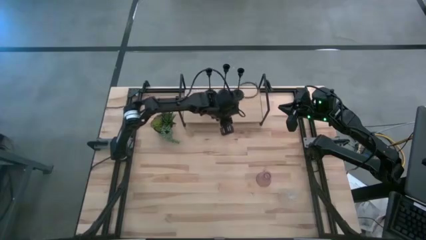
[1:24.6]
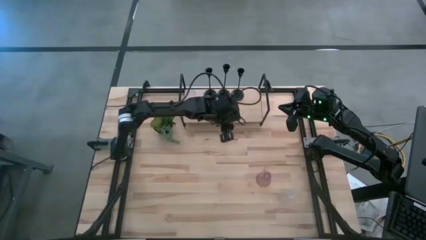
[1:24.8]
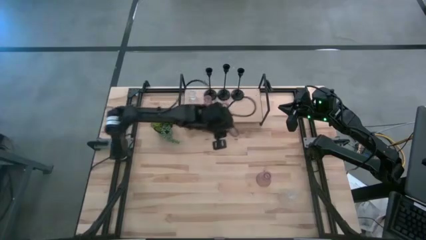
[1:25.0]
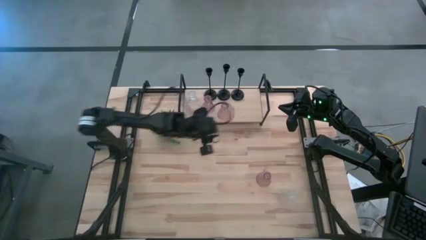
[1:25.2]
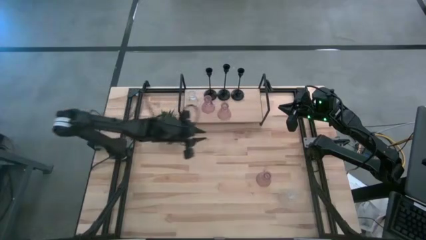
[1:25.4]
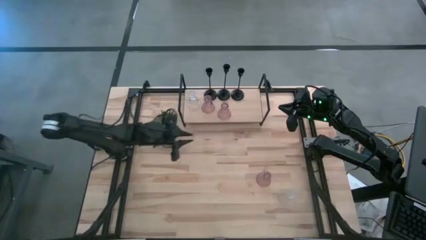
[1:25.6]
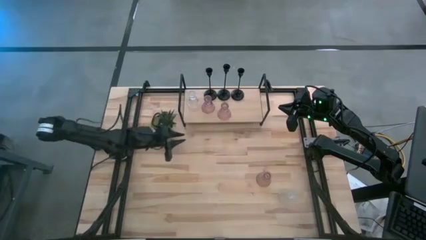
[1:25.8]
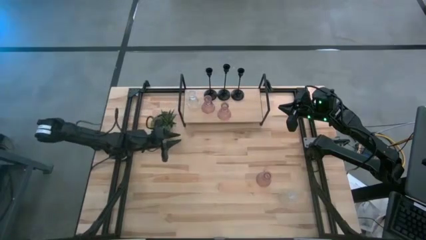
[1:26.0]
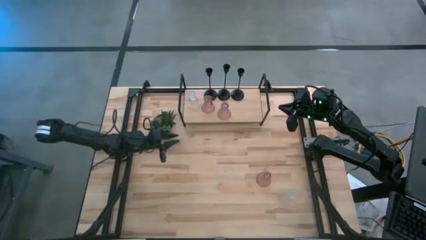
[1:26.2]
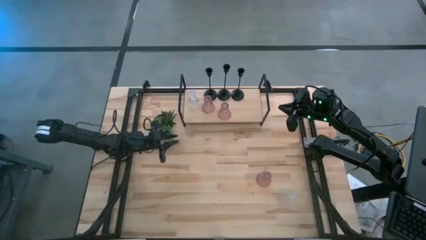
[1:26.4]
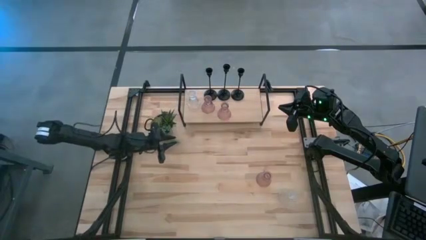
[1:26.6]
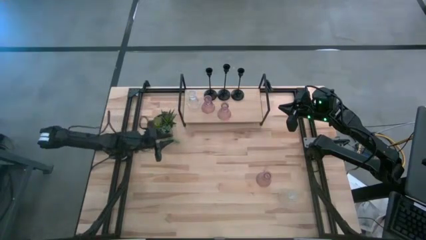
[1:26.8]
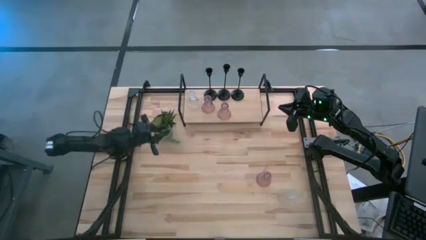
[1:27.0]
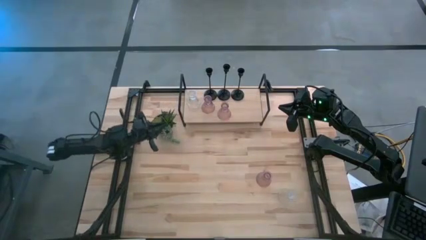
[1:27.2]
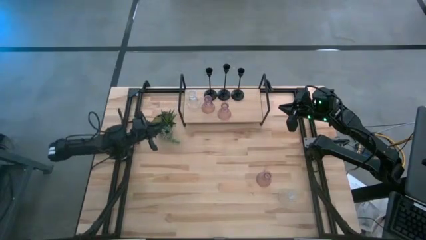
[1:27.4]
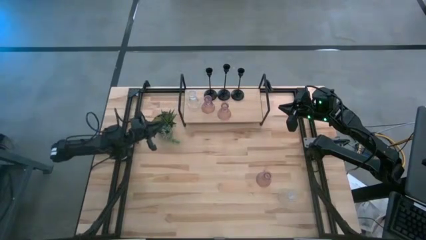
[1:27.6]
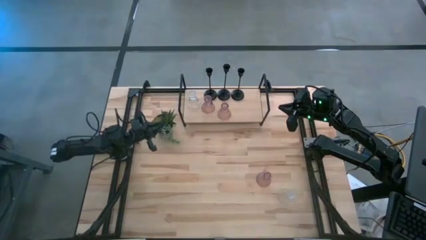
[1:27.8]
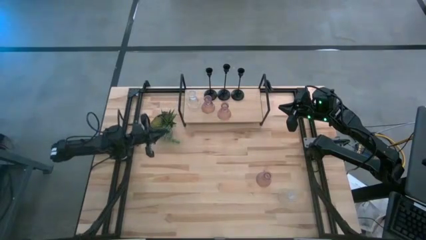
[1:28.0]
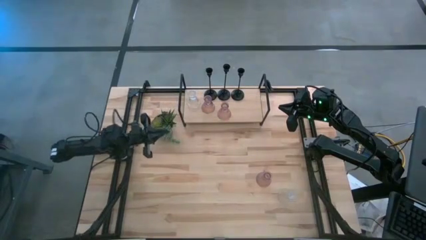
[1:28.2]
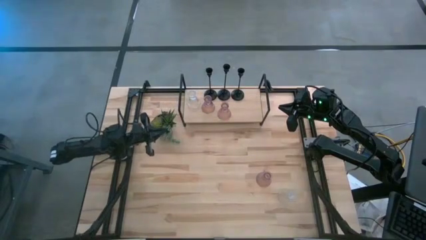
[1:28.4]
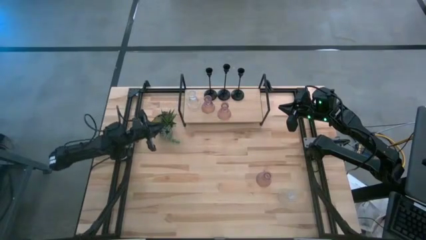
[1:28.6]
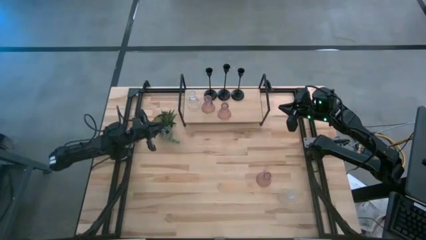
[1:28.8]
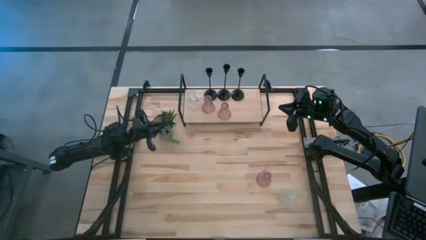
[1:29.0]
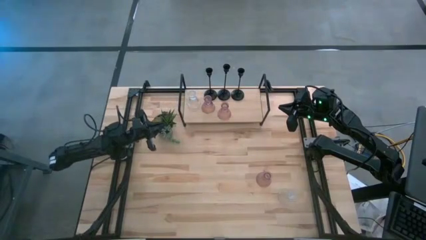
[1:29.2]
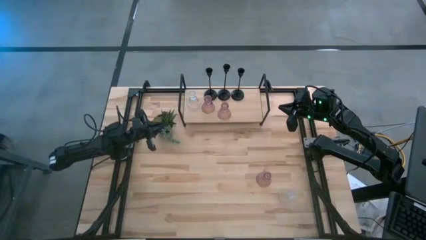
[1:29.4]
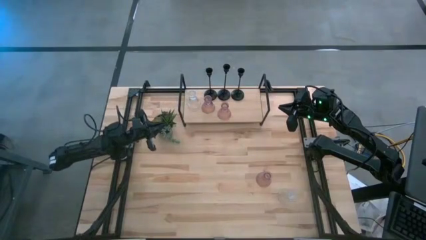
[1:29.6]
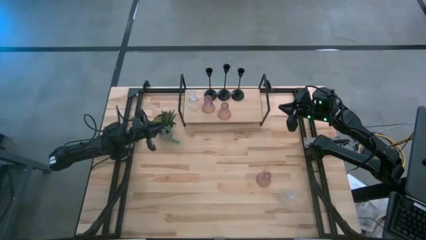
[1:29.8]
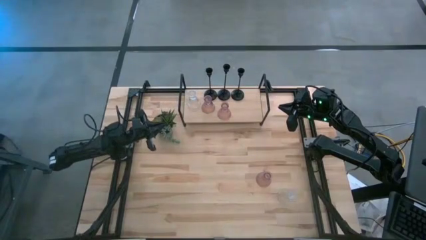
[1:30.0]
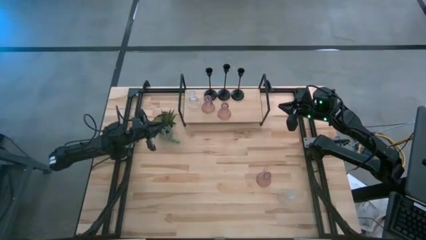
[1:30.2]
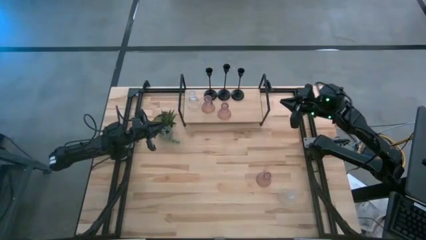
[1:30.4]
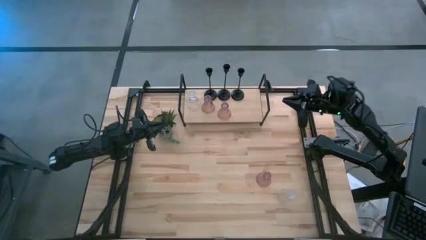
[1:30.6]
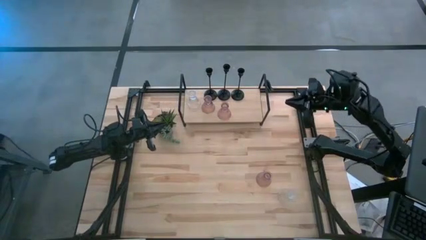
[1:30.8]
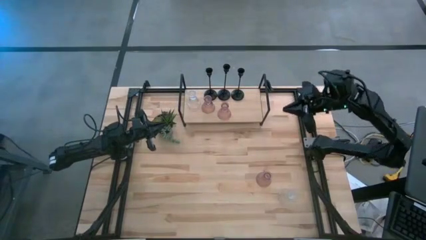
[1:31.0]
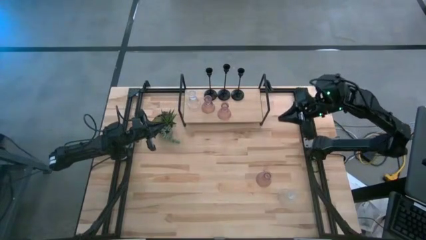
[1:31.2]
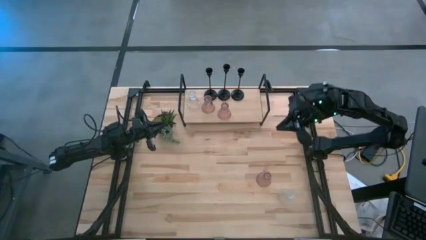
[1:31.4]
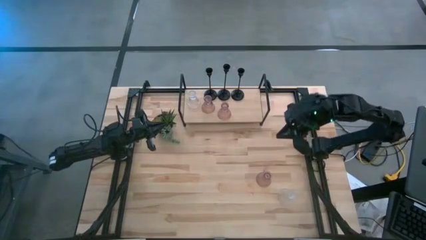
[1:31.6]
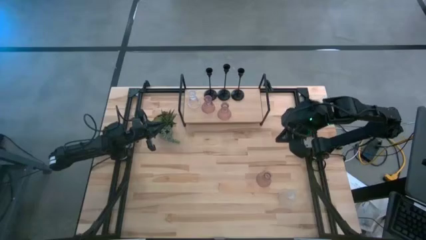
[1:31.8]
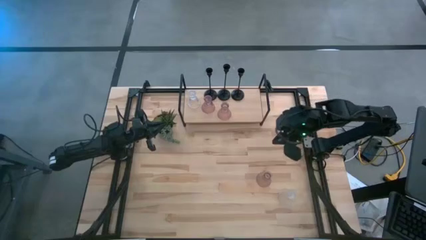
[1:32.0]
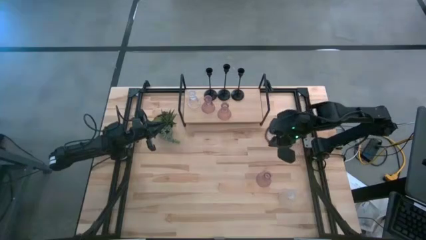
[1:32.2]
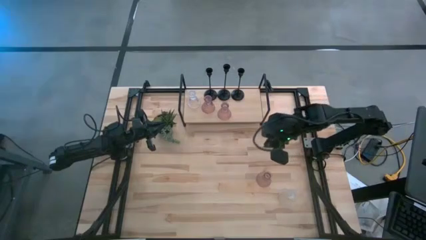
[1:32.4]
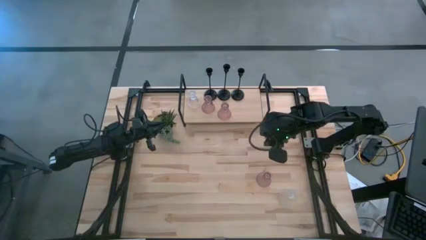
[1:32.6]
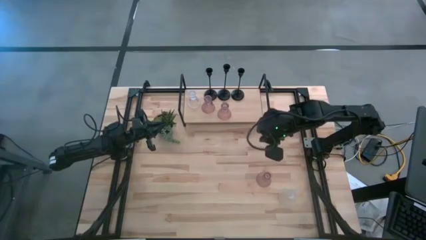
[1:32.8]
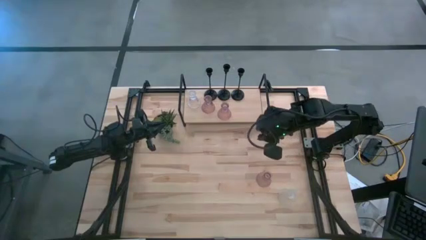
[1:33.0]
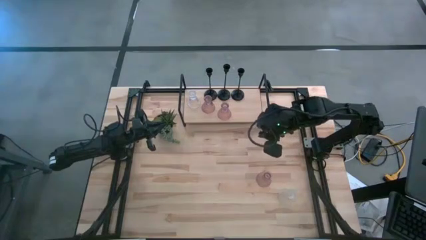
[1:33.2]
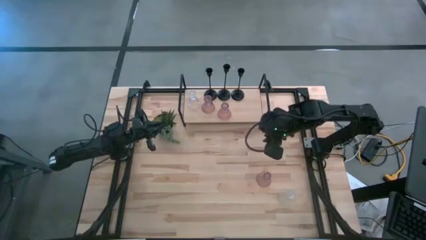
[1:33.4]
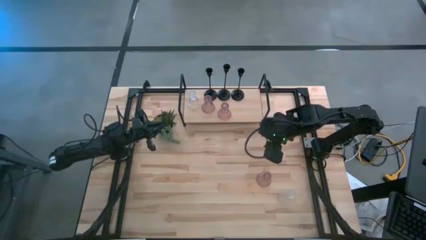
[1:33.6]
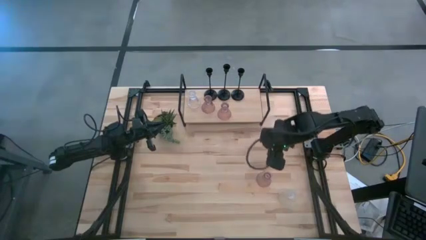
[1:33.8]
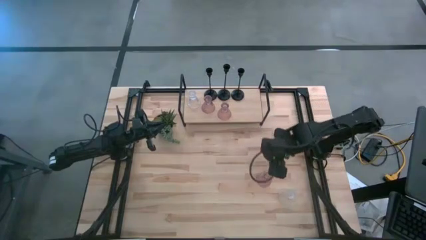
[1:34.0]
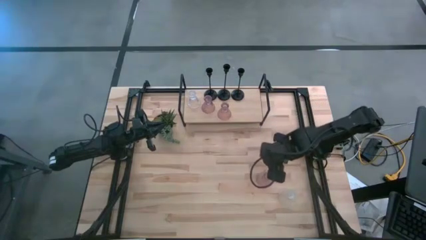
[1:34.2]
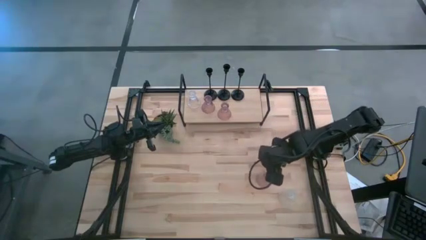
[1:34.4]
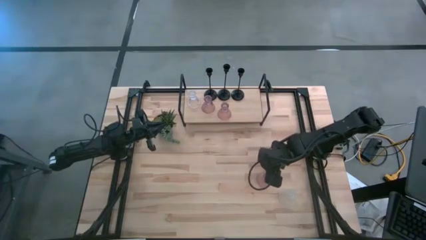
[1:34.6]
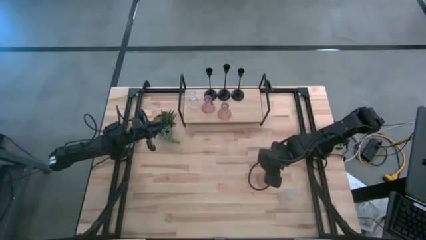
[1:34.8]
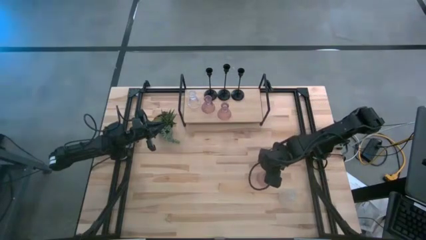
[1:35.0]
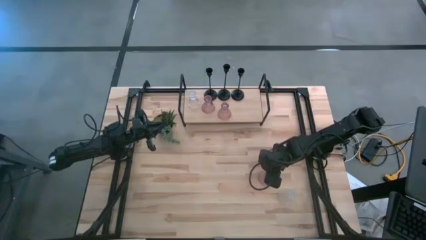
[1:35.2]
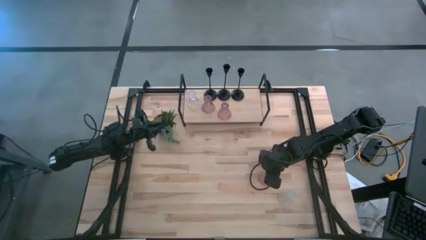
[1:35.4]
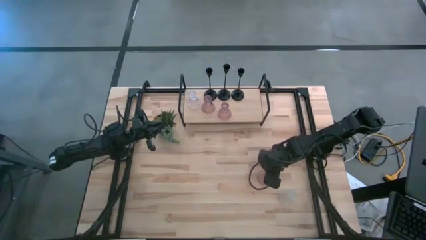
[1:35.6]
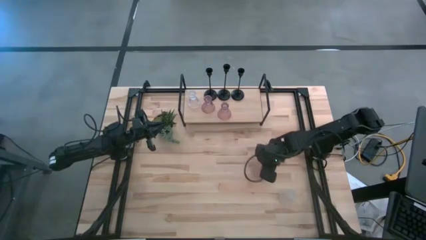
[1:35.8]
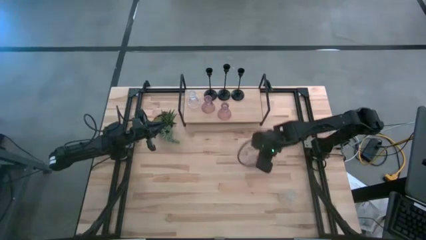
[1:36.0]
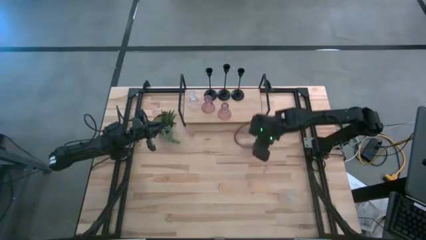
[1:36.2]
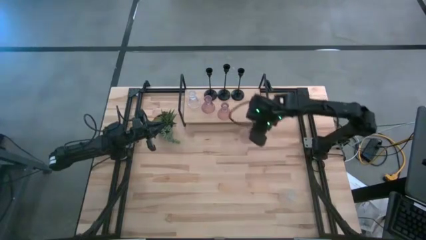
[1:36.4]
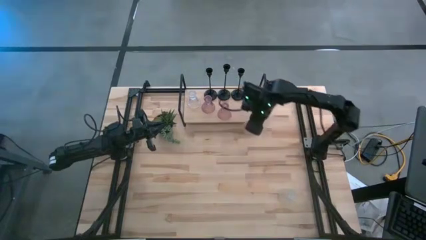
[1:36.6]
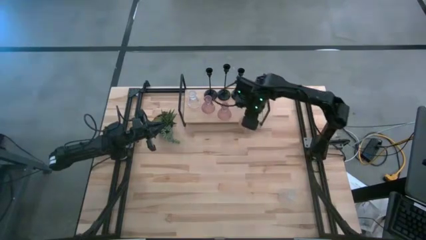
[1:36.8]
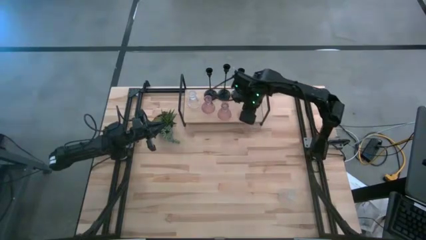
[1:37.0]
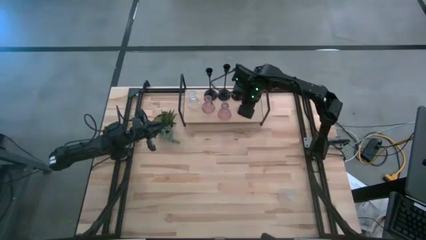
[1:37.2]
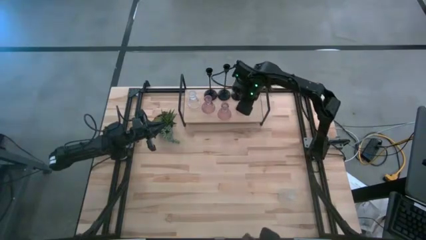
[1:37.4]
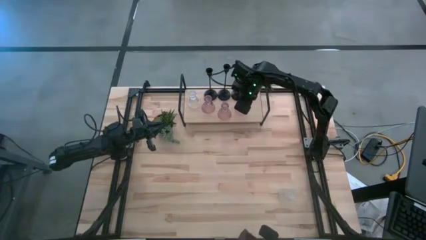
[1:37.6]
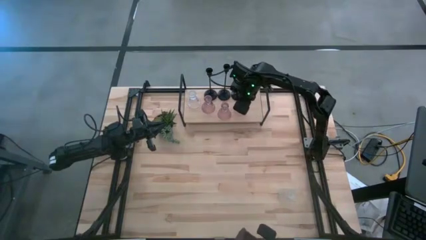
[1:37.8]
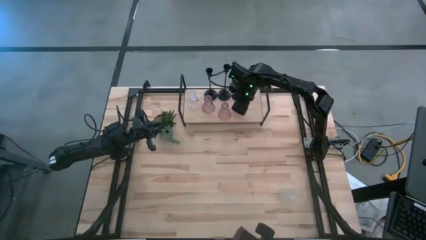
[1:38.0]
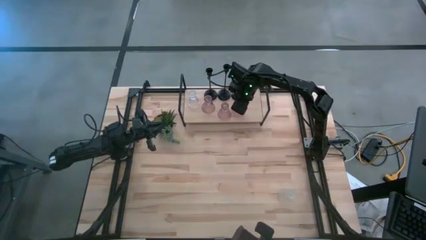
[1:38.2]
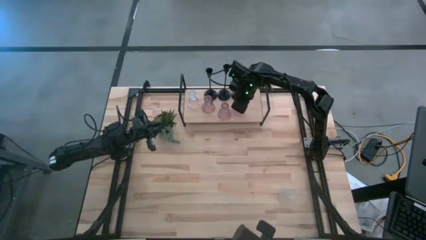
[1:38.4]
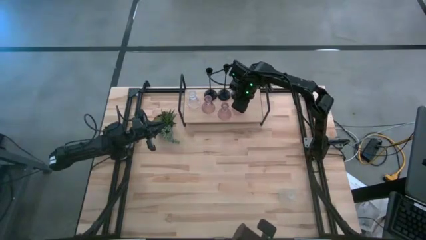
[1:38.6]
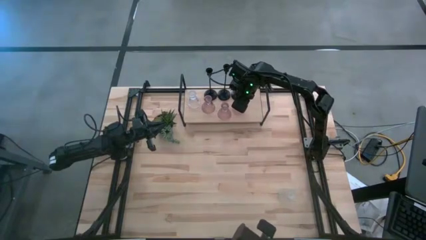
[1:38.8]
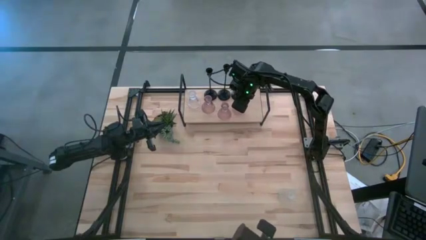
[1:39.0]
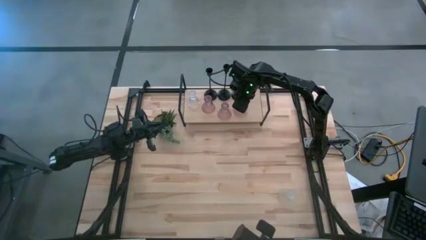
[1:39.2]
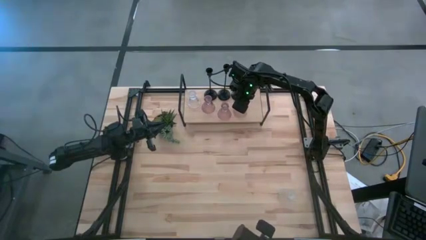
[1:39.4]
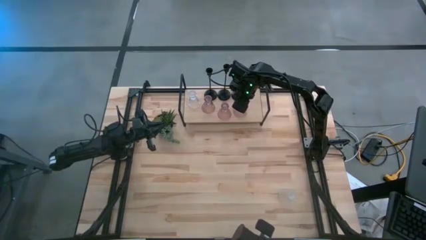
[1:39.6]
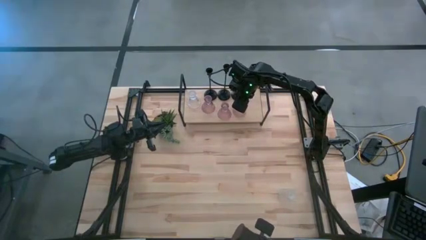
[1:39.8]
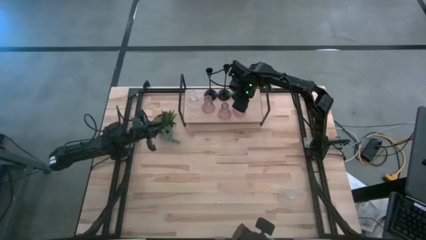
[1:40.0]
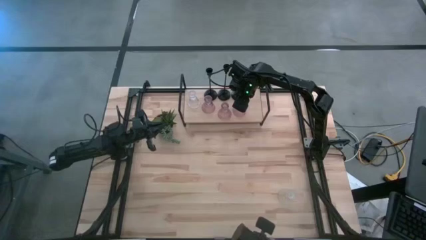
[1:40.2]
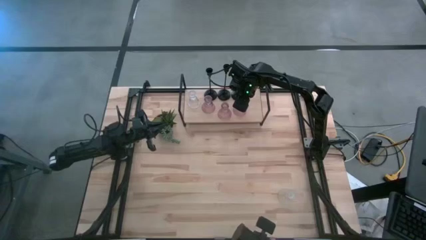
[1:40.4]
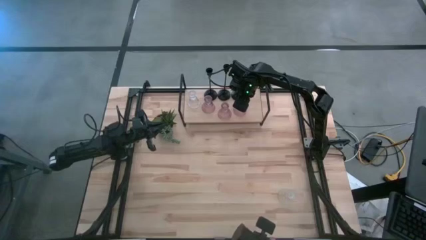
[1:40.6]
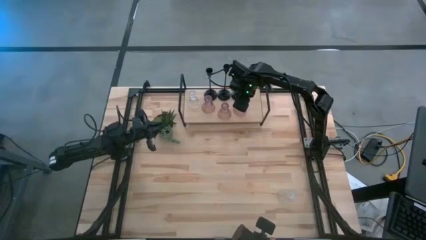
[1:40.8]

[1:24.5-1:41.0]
Task: Pick & Place candle stick holders
Put the pink candle holder on the shelf aligned with the other pink candle holder

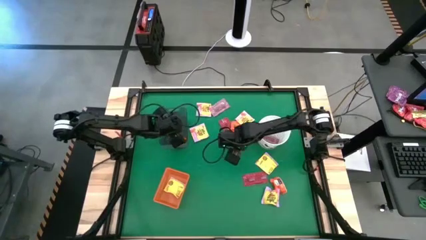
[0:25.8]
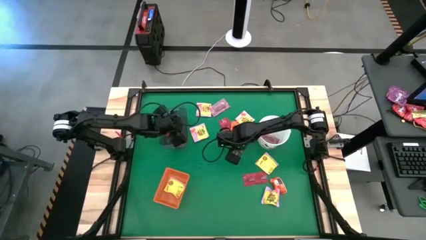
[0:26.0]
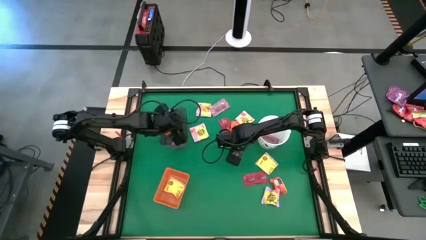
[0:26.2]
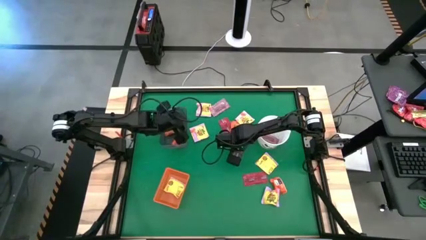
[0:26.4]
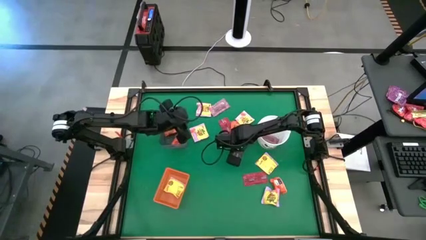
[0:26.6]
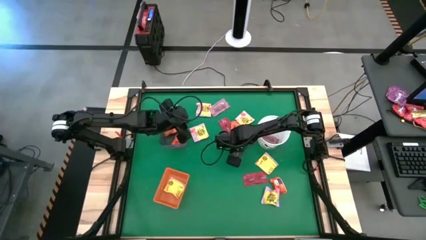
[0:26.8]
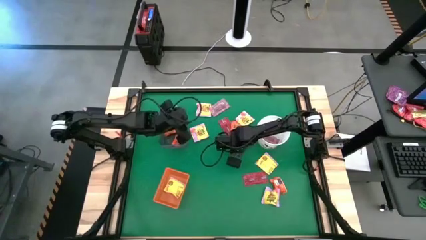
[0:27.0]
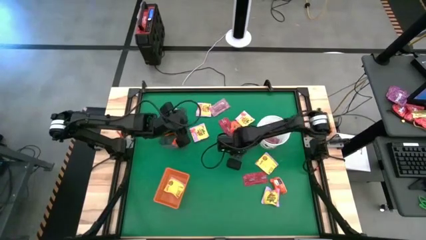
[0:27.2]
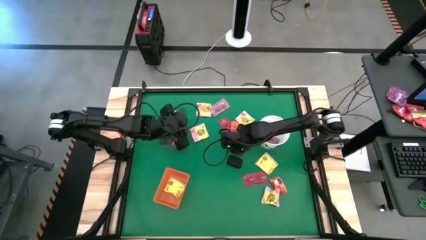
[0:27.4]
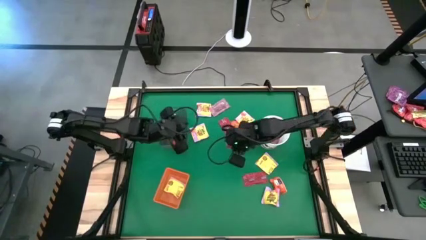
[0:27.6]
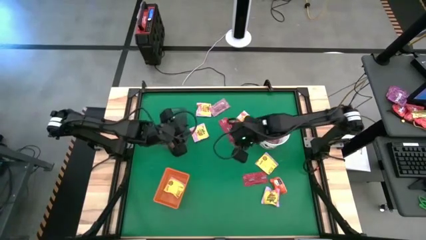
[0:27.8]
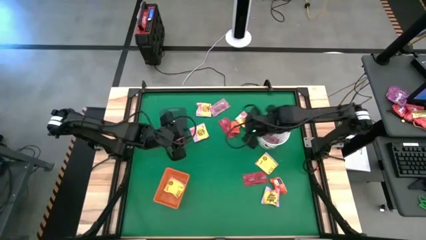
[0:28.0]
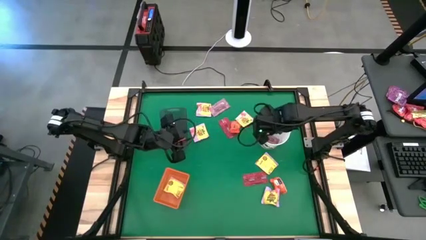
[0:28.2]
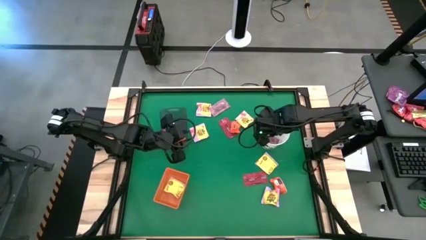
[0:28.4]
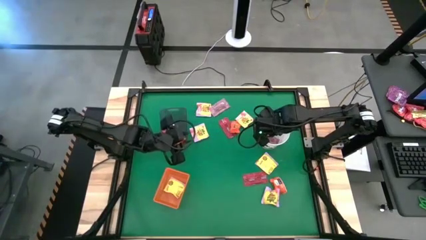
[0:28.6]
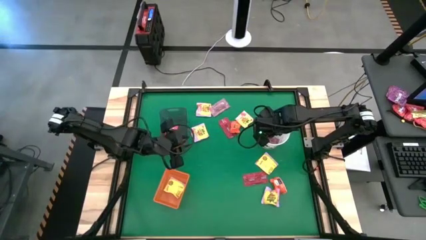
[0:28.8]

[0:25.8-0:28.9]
Task: Sort candy by brand, put in halloween buckets
Put the red candy into the white bucket
